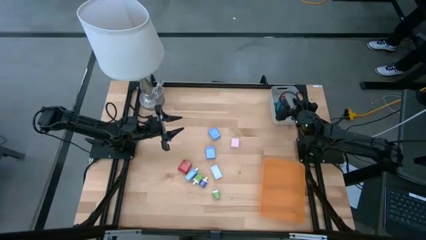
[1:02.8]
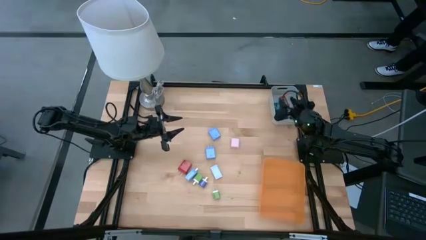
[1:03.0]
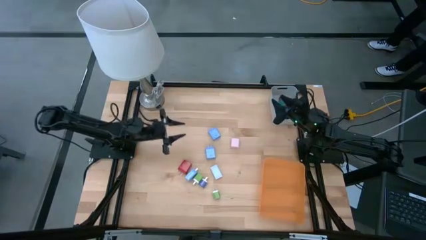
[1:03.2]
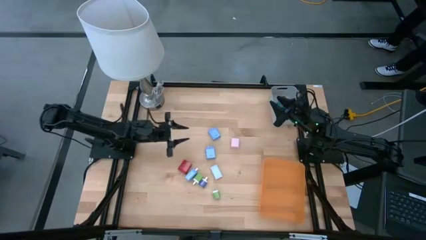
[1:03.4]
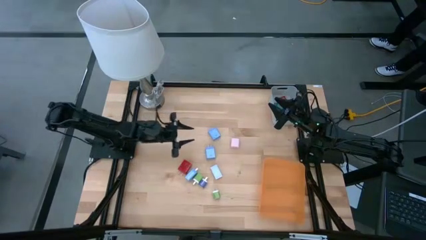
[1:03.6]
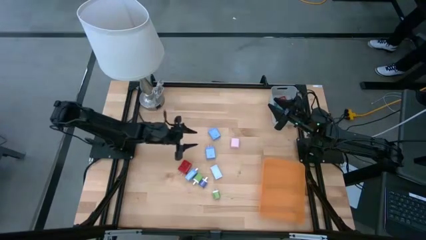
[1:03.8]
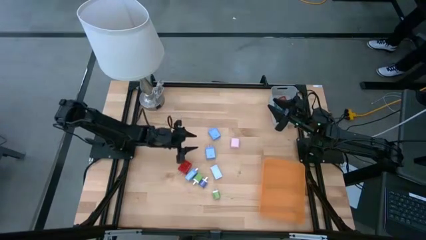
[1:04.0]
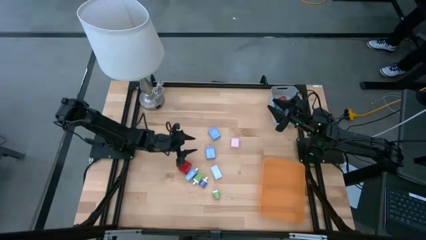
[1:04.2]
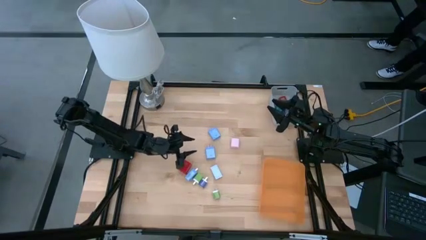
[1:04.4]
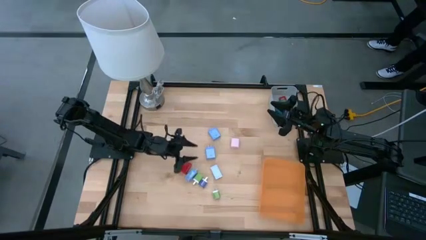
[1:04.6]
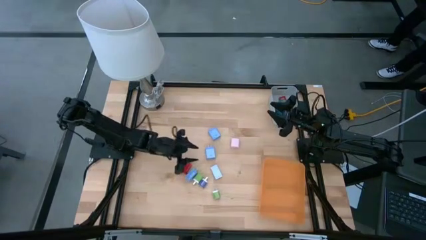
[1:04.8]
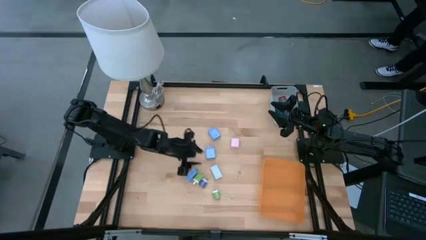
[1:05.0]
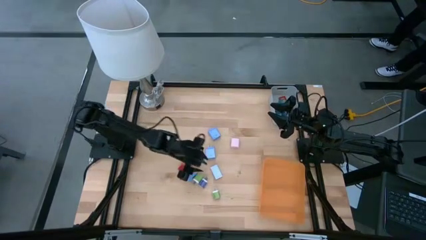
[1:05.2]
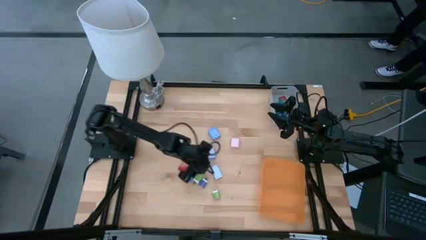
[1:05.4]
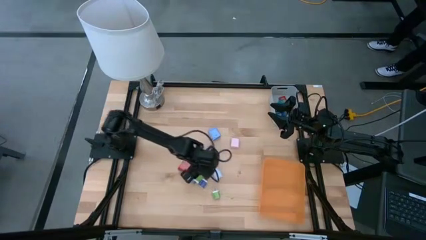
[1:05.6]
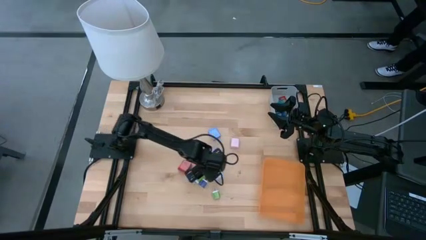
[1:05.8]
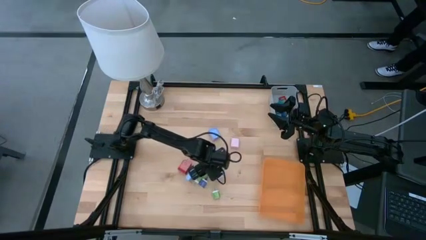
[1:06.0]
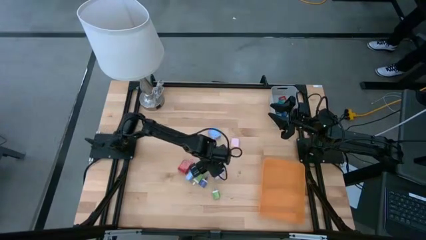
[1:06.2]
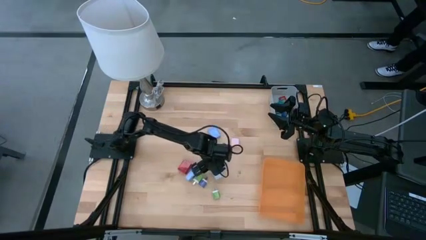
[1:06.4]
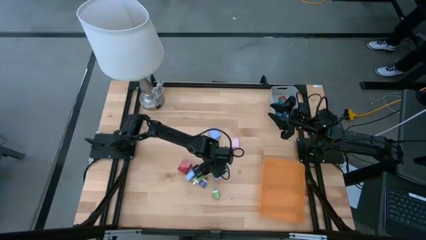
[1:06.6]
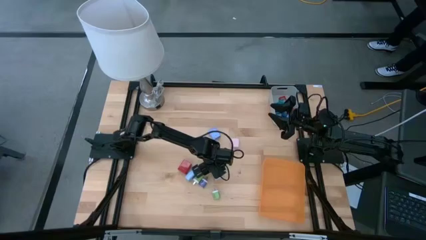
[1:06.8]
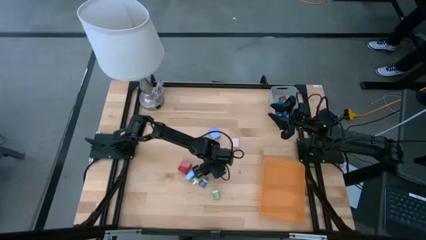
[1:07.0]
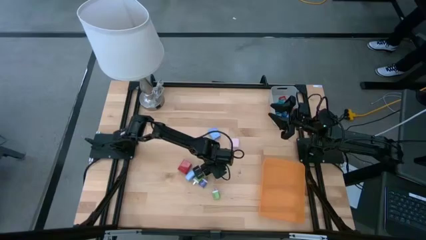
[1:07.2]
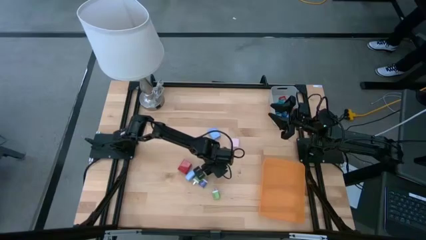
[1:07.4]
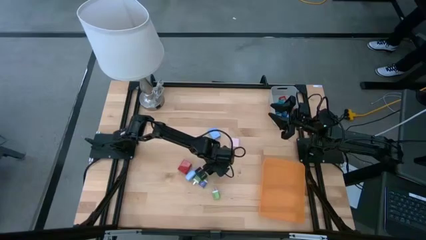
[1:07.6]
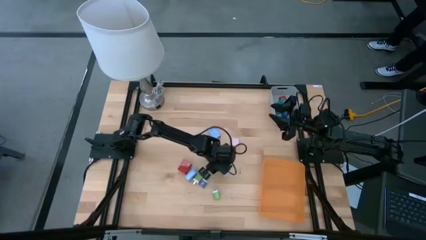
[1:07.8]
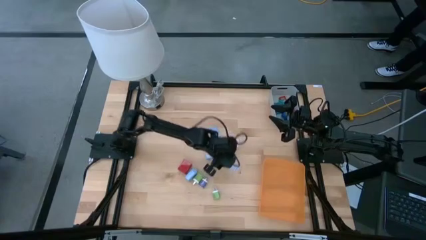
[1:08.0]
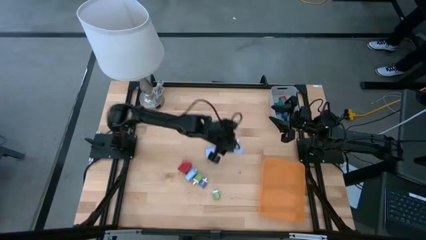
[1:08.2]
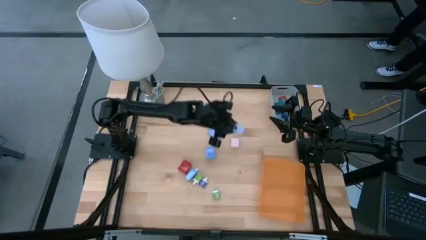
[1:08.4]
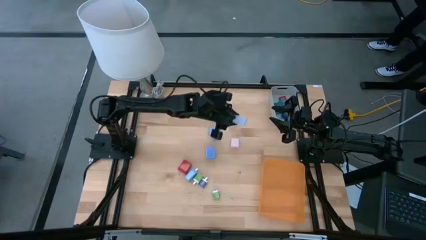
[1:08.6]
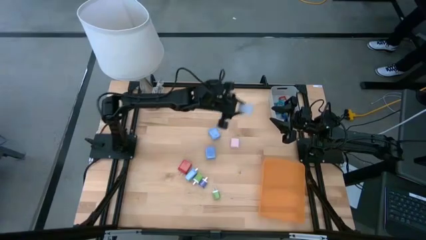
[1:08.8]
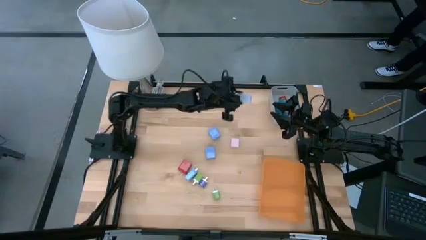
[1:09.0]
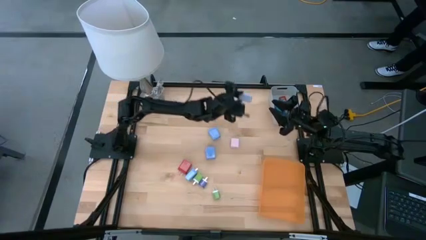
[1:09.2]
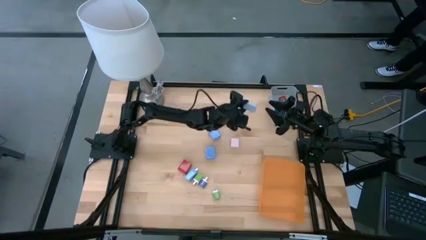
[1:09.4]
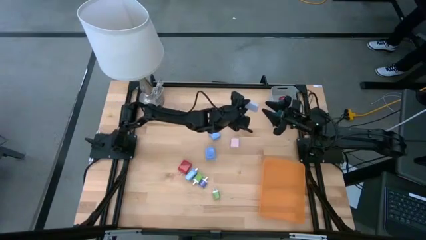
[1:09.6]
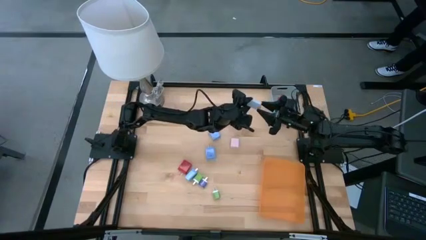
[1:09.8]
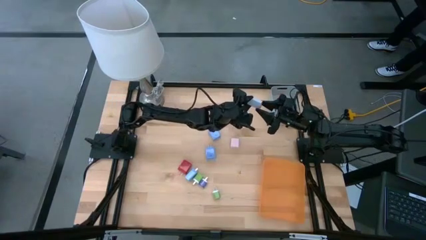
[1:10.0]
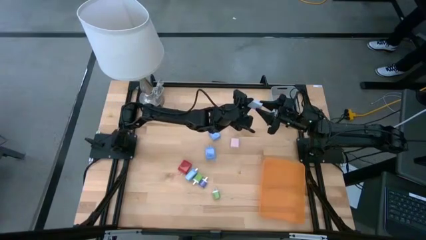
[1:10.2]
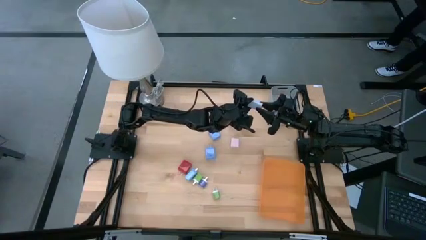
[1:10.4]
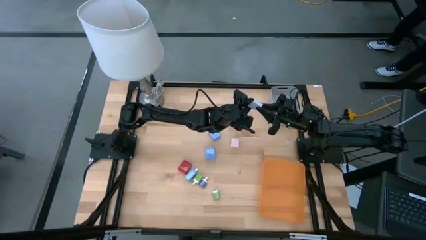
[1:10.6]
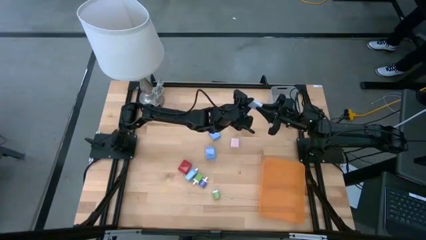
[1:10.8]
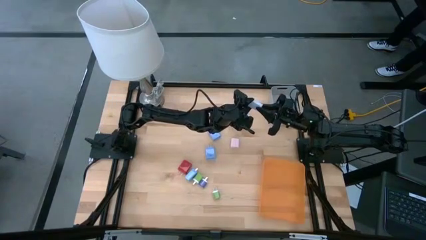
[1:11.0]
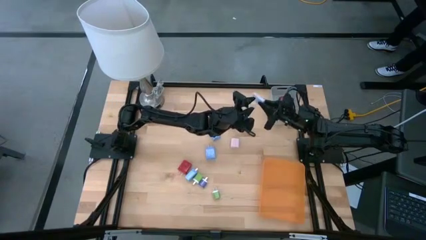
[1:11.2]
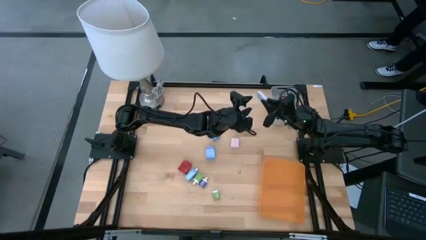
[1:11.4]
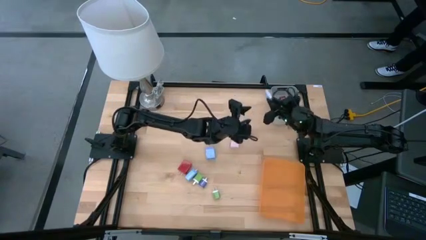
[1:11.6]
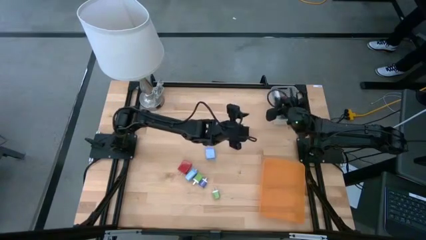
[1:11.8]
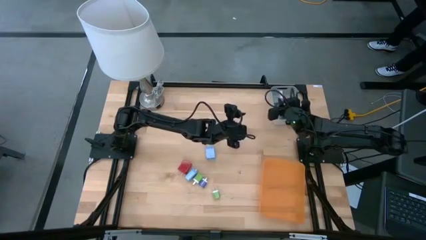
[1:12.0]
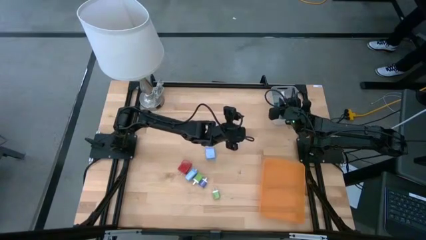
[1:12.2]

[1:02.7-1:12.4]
Task: Pick & Place Office items
Put the white digital clock into the gray bin

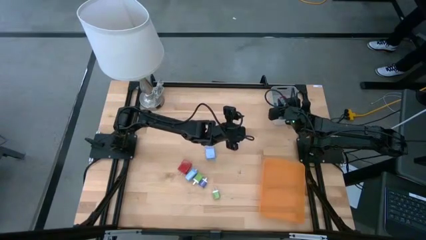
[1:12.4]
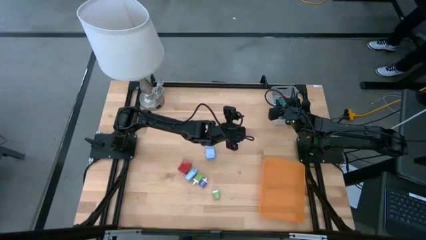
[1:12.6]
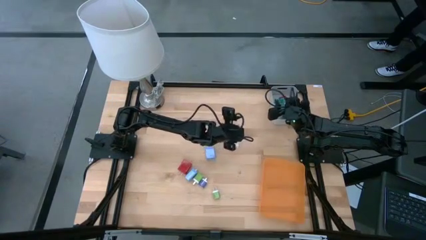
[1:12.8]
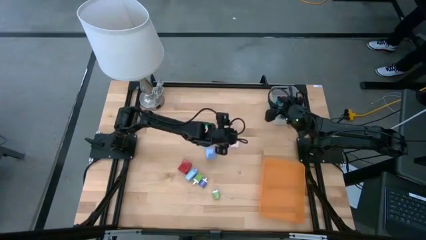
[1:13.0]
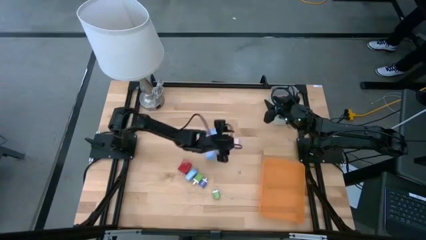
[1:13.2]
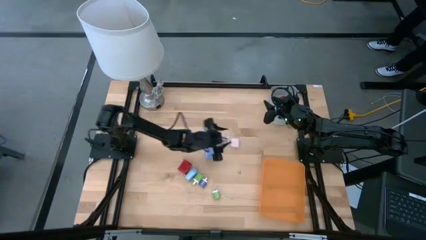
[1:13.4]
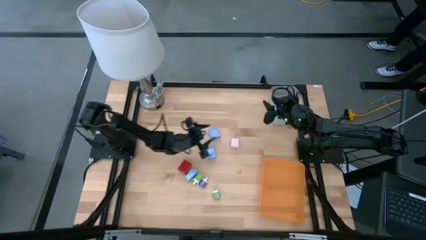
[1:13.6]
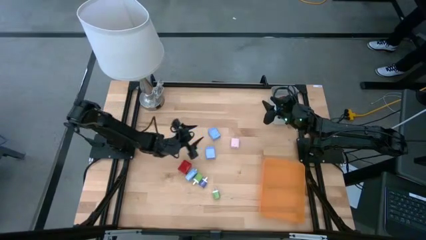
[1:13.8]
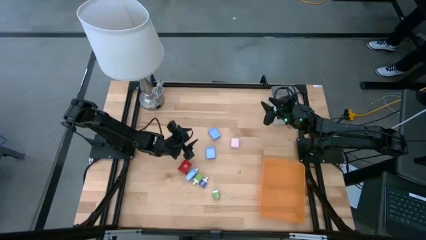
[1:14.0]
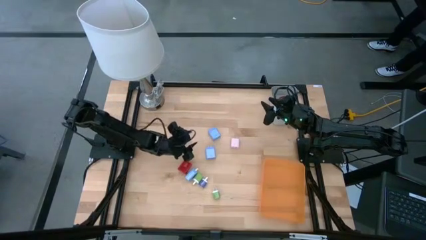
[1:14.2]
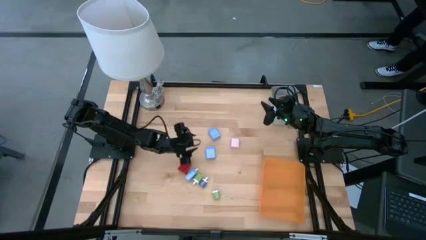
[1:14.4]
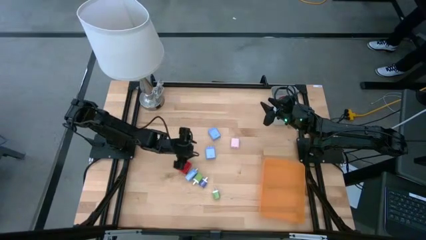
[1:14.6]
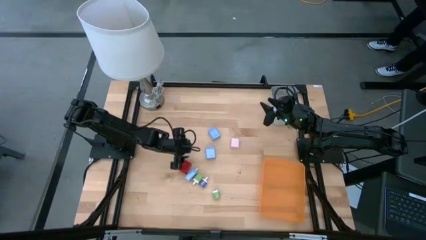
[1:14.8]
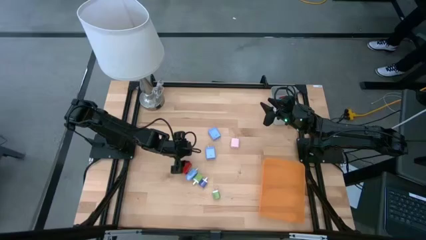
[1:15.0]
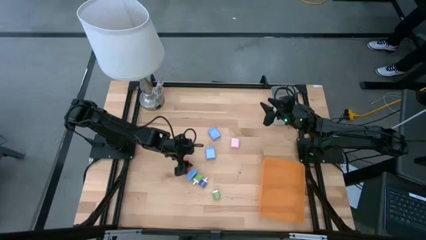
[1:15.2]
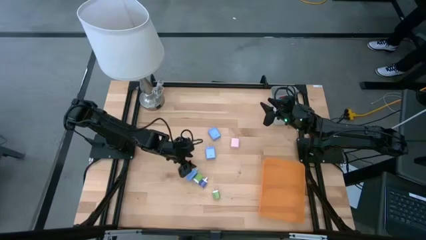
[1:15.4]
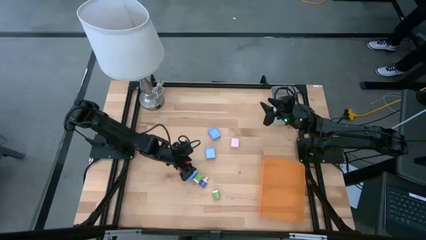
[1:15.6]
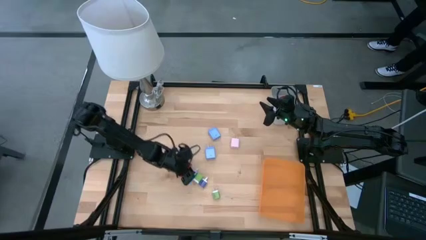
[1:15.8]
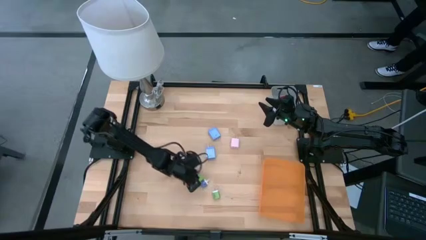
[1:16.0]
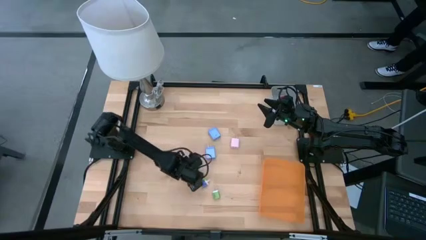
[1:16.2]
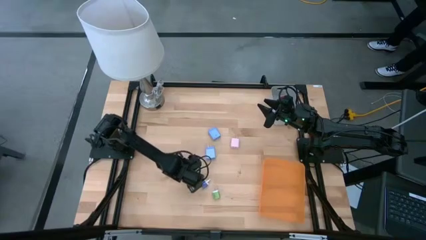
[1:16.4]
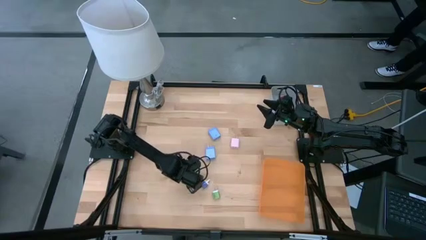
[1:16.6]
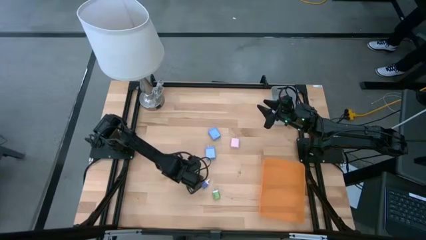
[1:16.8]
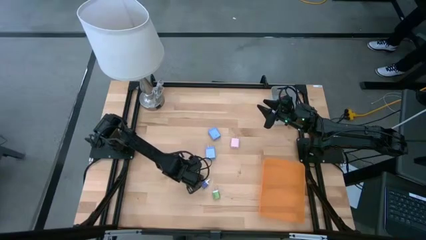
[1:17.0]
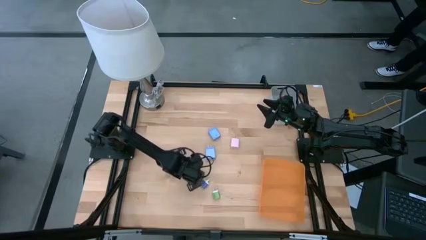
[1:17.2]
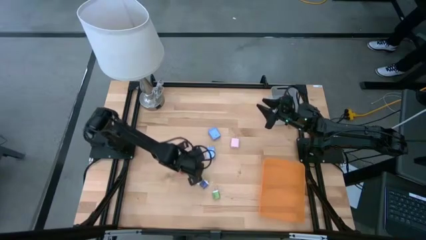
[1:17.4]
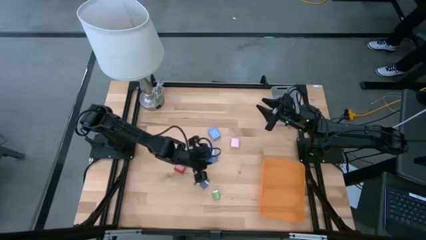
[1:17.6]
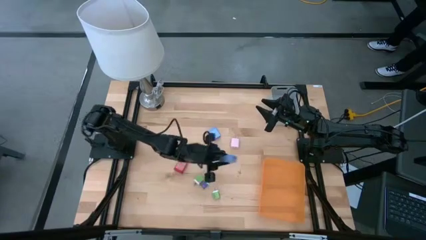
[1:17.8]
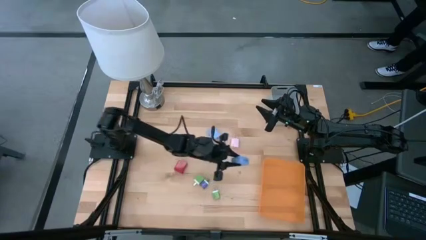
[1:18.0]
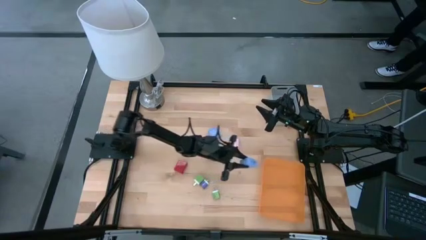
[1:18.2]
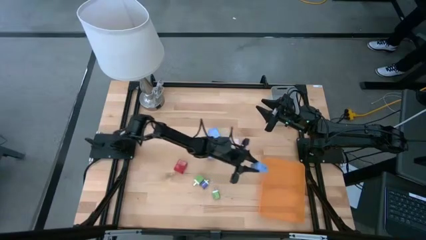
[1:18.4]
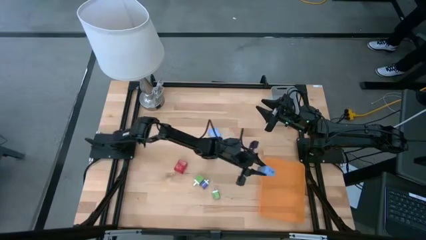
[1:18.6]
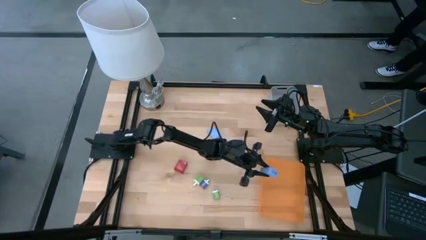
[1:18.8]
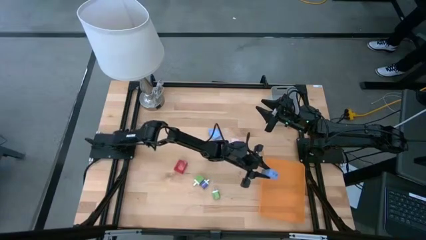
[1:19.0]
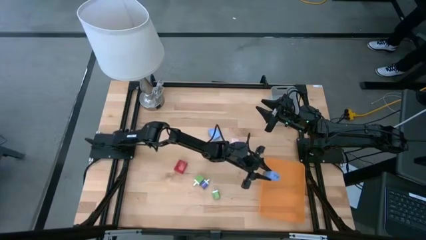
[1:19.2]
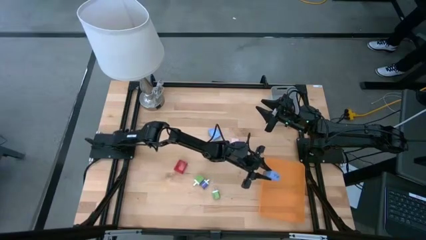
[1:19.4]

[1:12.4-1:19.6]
Put the bottom blue charger adapter into the orange bin
